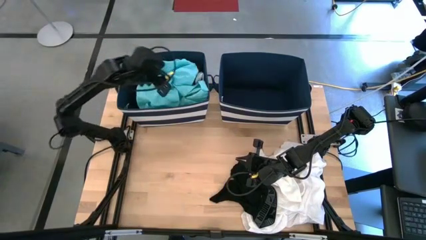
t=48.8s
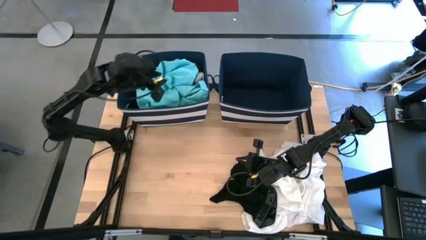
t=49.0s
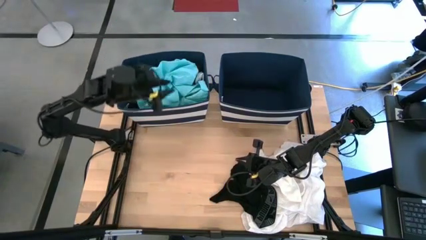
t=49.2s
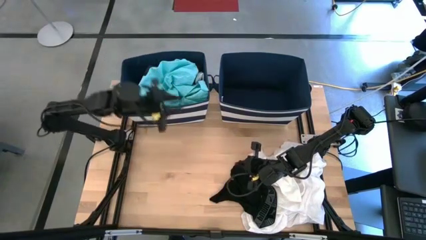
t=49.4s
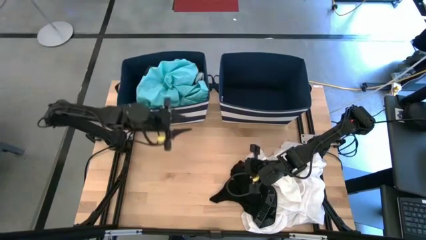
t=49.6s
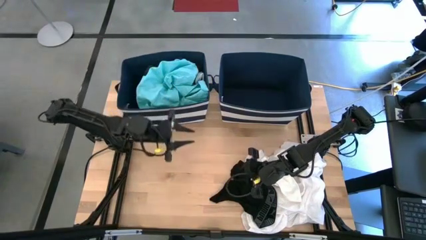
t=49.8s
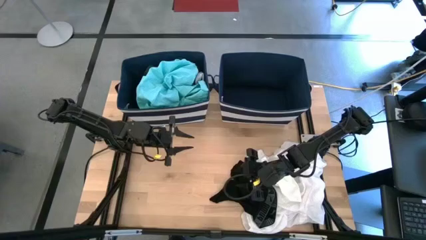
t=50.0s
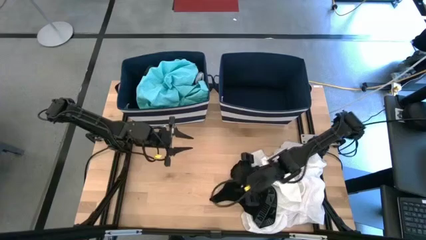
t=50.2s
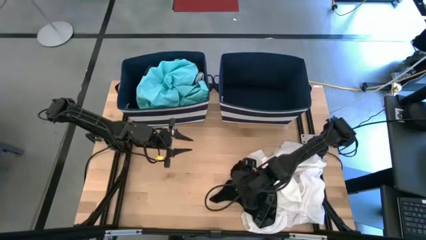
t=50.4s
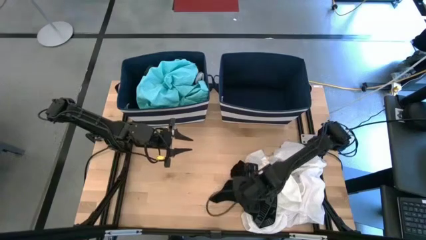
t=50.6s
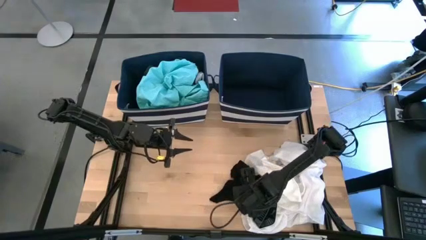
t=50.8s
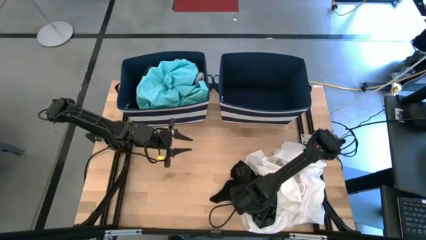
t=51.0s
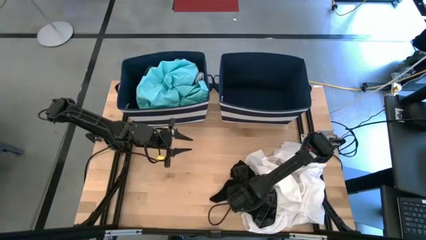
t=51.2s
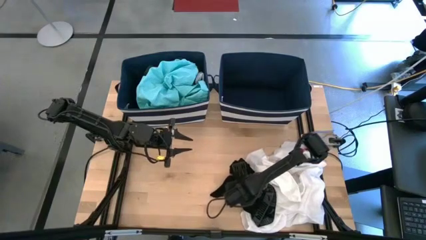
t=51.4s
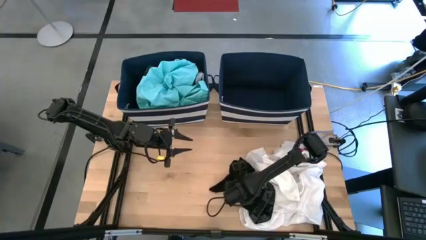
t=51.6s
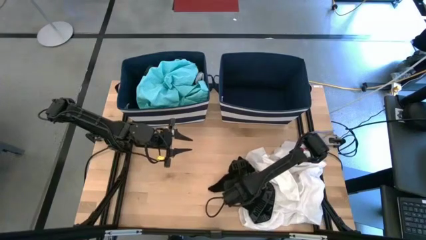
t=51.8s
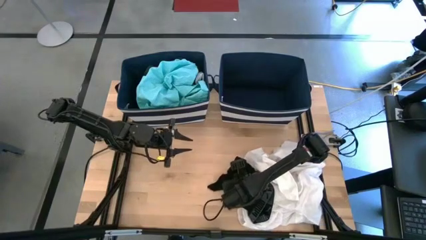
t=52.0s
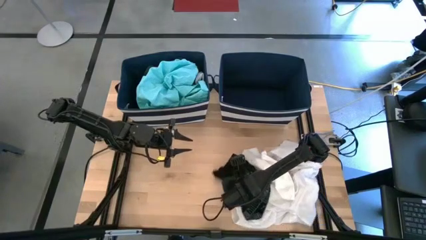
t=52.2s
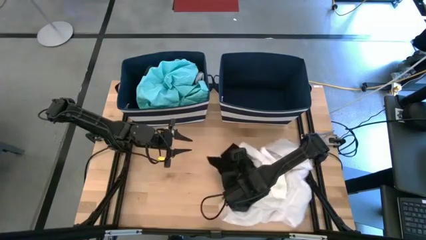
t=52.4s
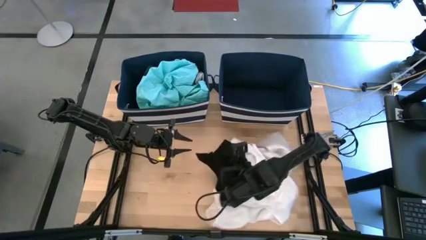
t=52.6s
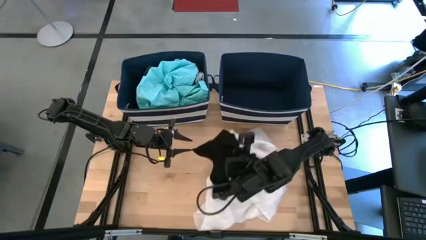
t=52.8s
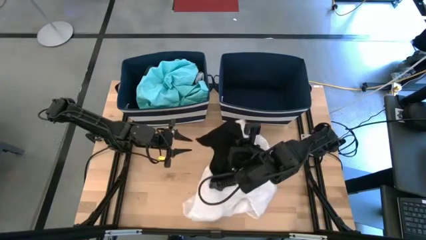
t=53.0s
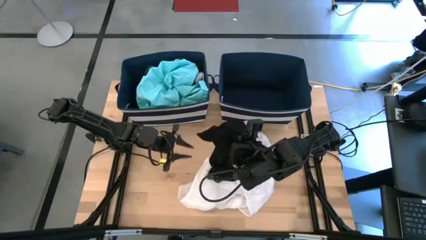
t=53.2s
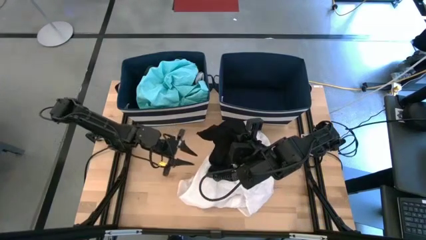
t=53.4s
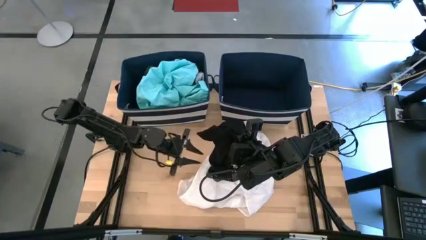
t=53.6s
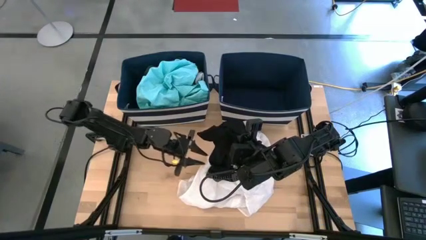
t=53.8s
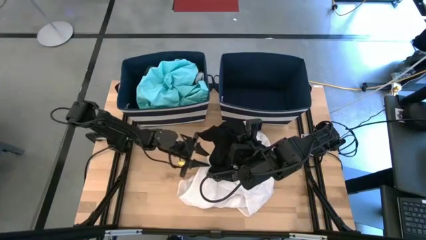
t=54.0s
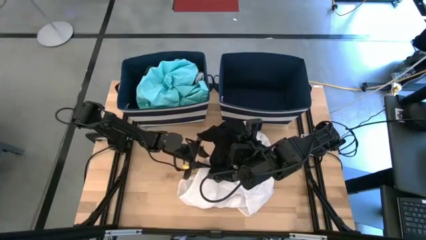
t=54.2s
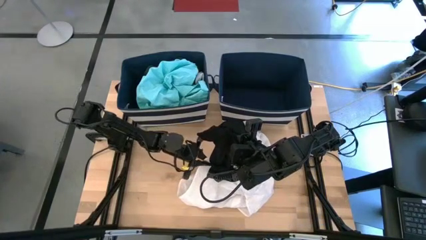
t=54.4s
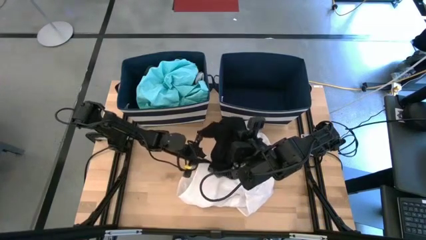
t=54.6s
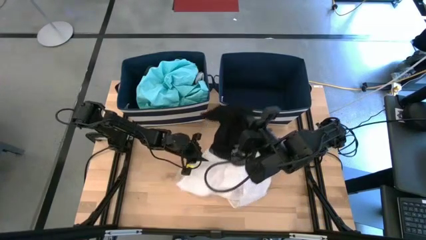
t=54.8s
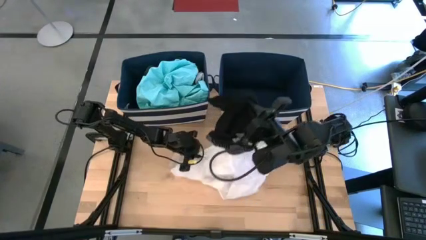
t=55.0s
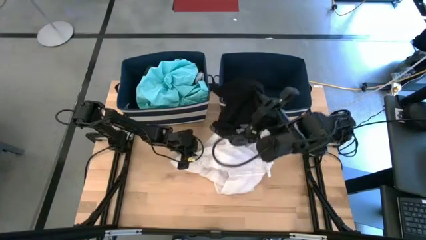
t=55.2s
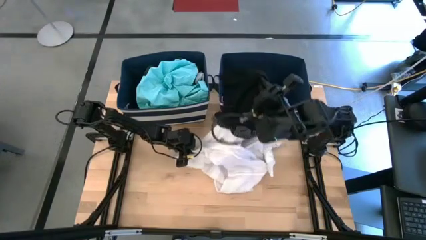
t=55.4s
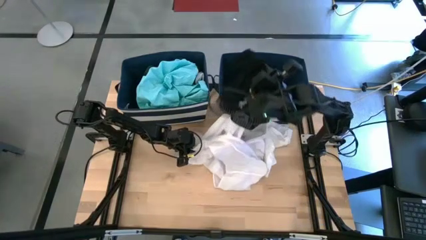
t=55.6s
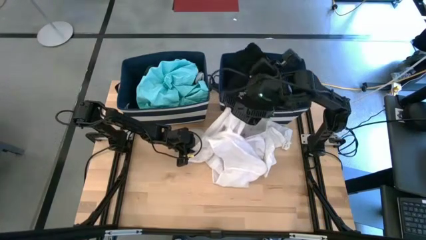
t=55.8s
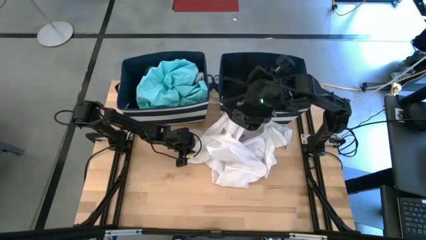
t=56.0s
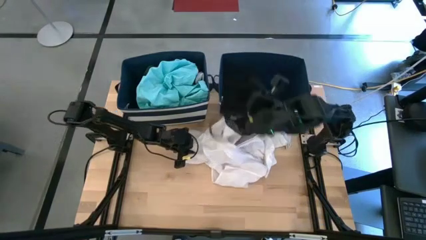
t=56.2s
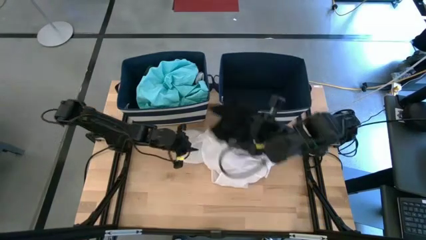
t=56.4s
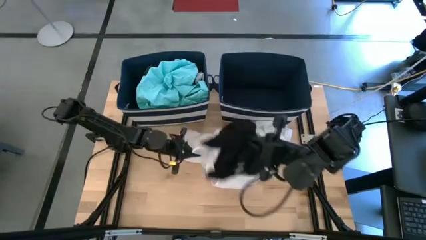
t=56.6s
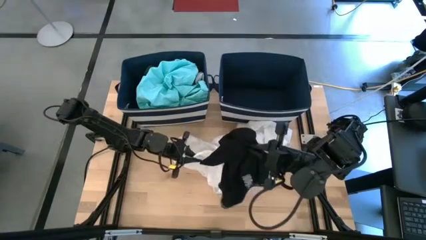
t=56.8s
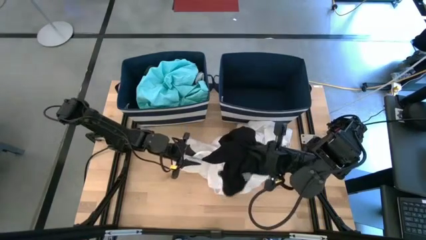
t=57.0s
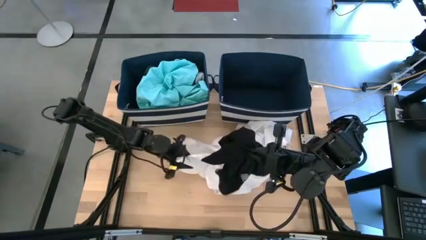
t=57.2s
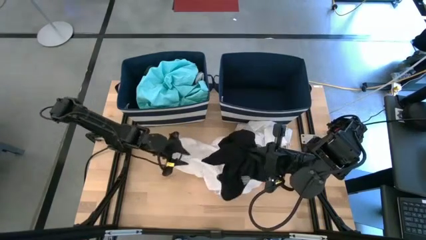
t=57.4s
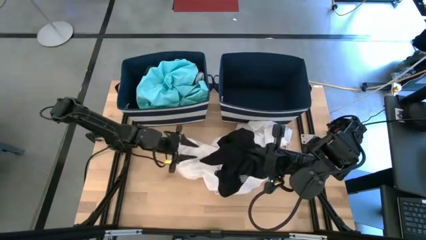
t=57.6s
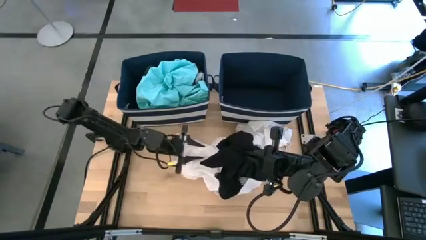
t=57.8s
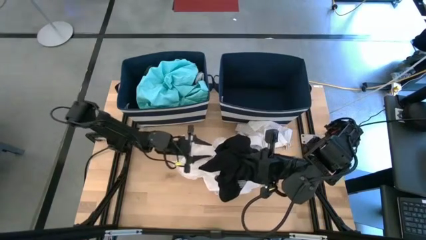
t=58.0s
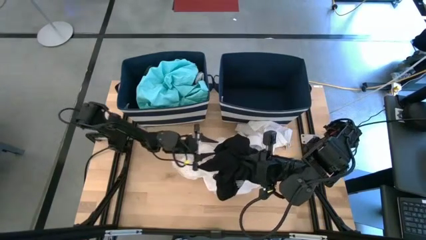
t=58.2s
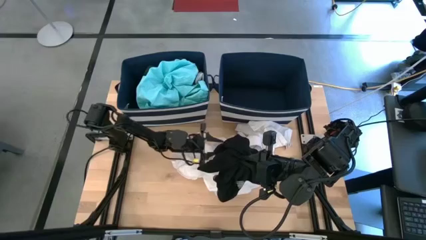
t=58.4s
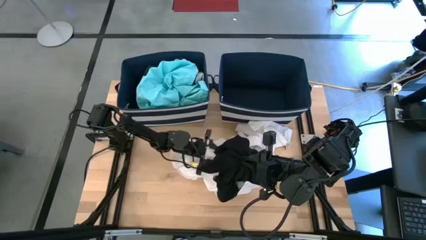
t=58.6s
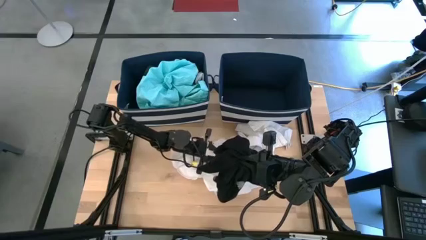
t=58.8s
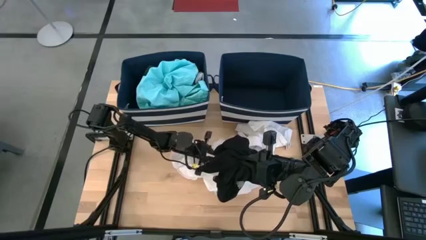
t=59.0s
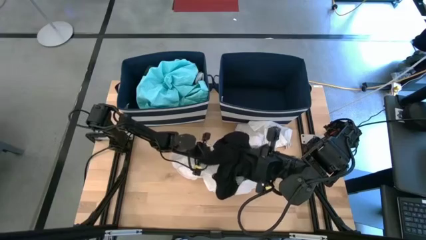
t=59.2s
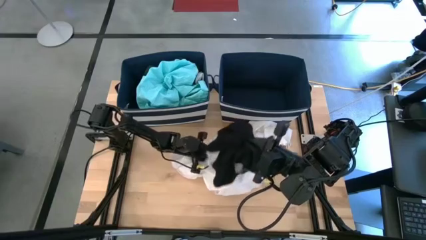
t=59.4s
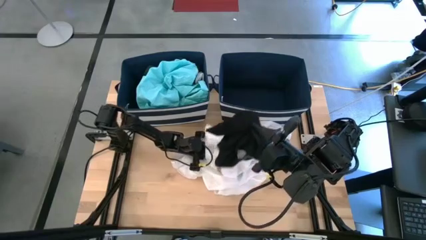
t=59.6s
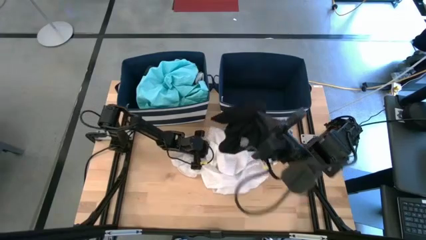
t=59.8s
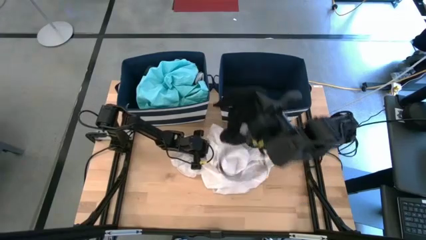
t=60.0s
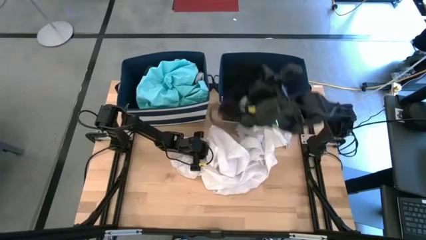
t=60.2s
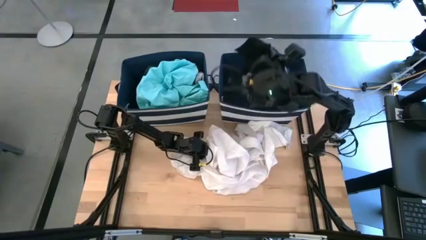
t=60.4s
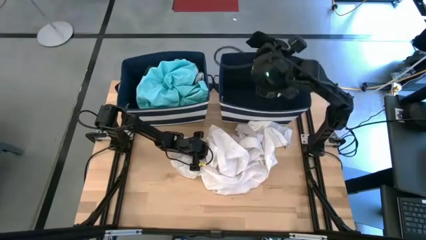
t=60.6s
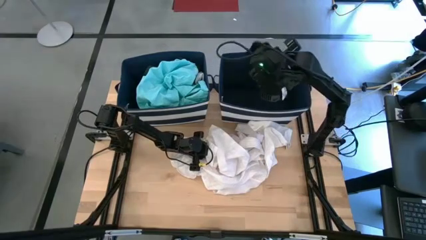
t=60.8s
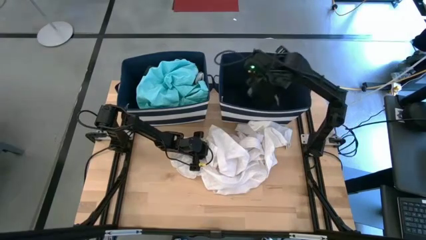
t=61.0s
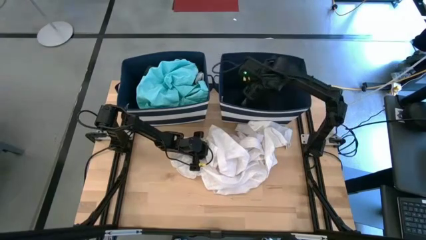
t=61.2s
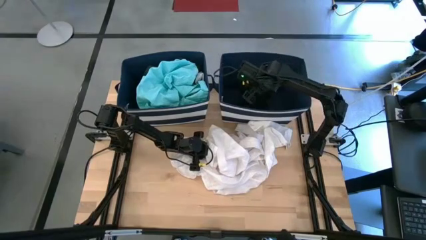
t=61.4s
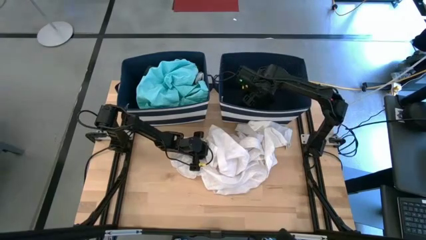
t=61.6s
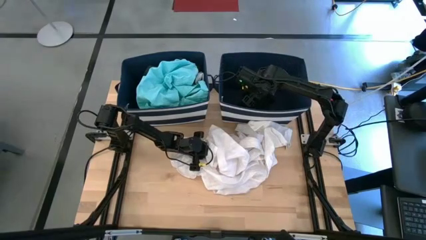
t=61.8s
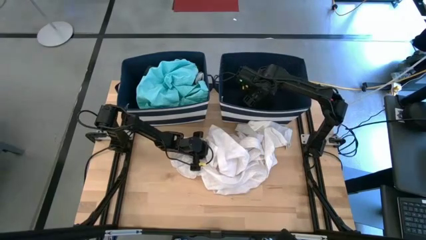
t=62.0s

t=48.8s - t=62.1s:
Task: Sort clothes
Put the black boxers into the right blue bin

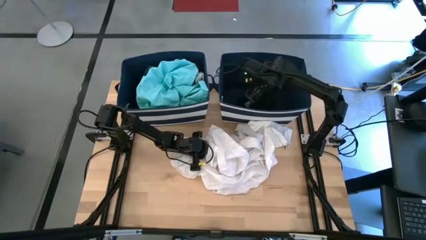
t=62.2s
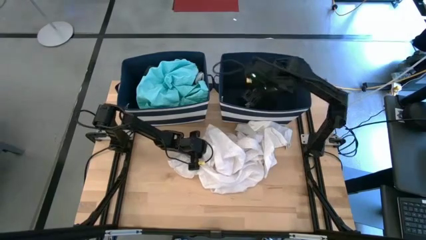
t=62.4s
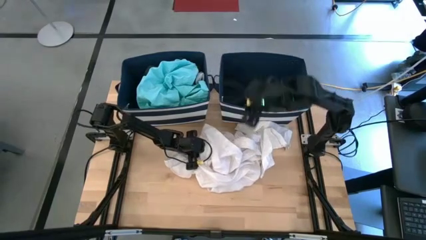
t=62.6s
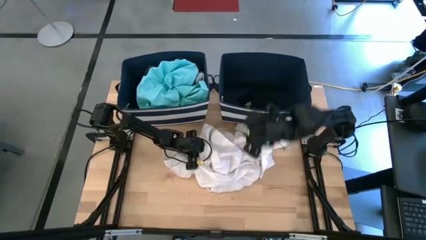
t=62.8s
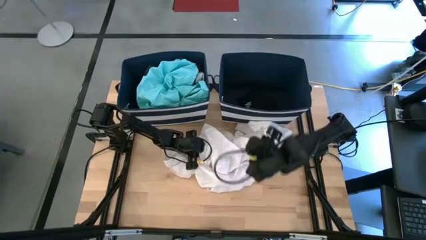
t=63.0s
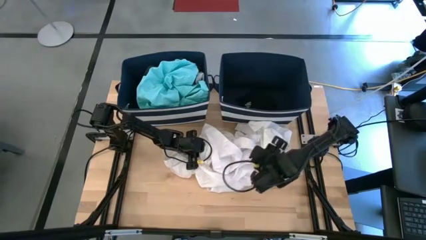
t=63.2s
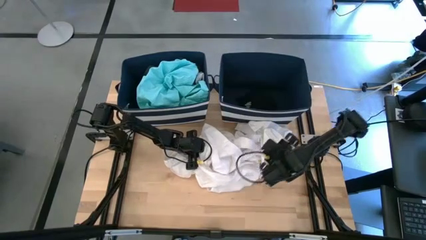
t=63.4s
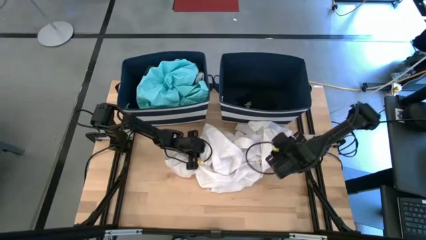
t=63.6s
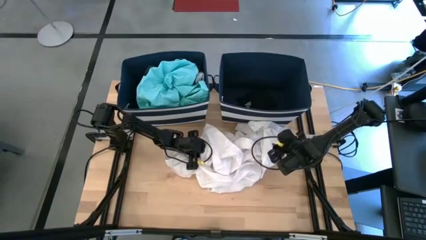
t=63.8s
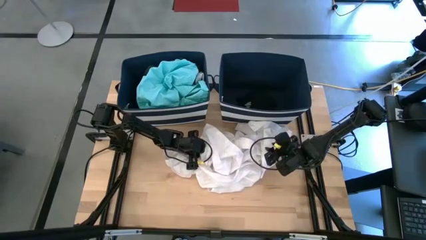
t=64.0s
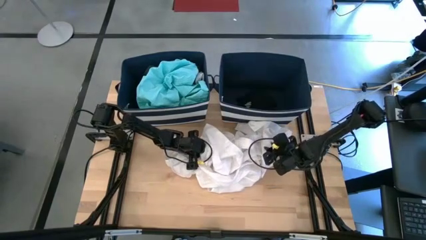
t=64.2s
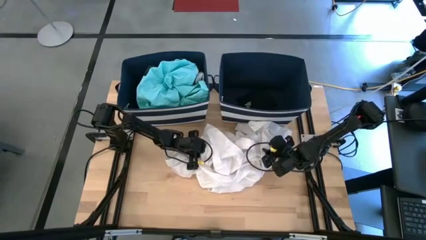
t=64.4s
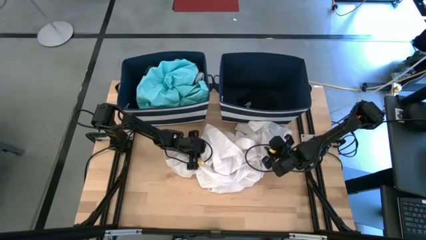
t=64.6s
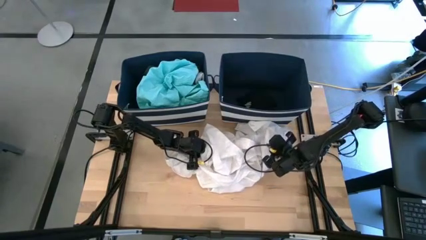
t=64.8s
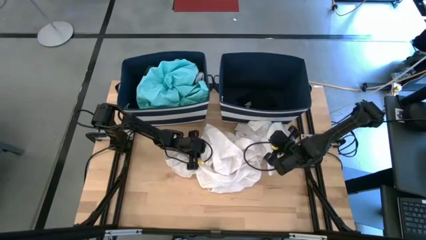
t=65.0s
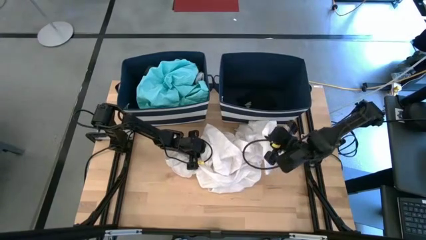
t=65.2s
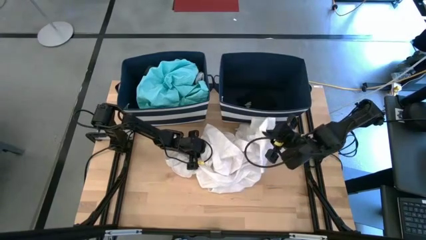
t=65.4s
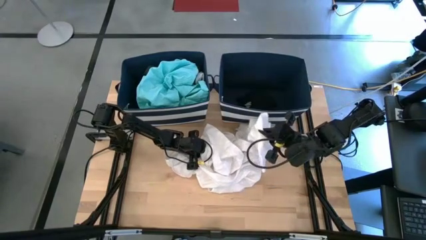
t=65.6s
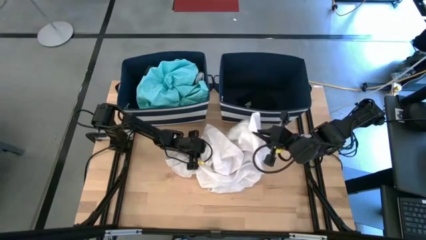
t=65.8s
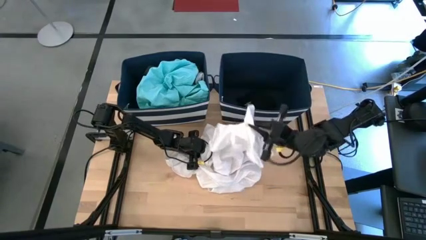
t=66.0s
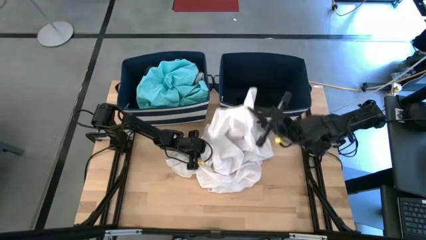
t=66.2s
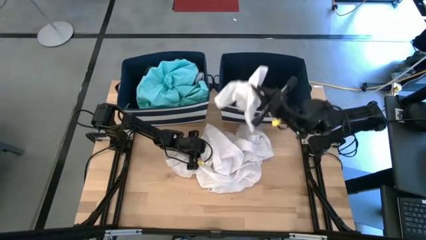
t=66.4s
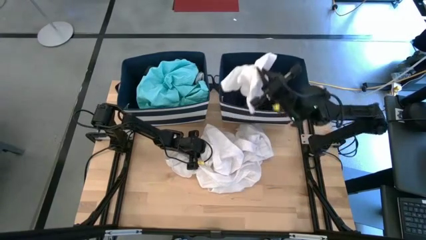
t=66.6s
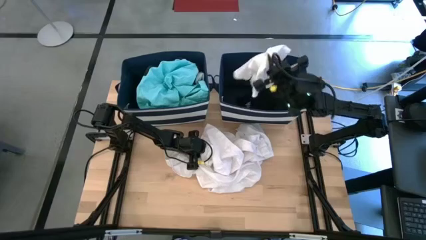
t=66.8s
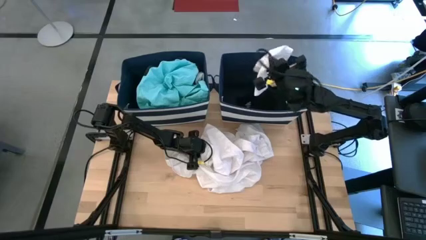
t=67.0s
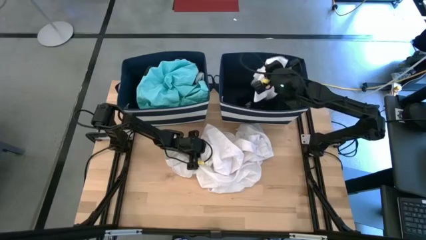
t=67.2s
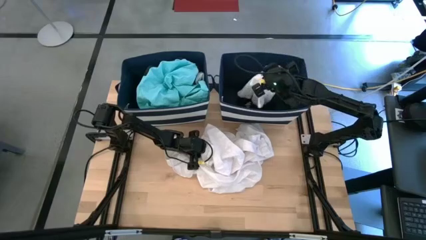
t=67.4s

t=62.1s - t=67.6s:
Put the white shorts into the right blue bin
